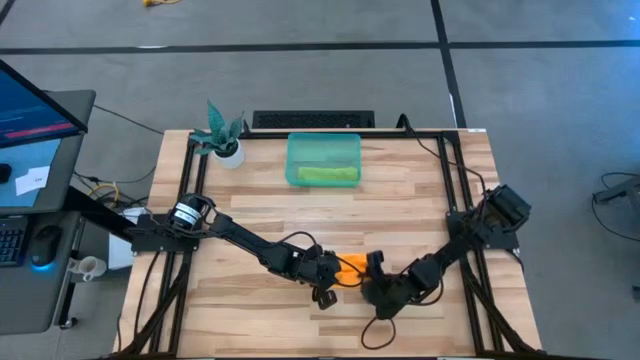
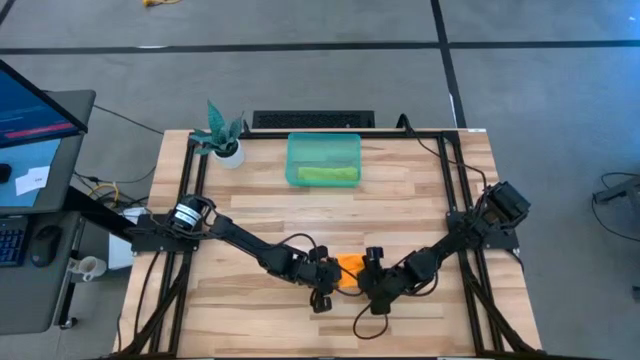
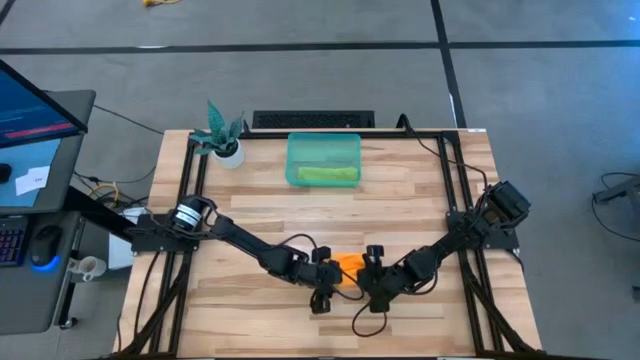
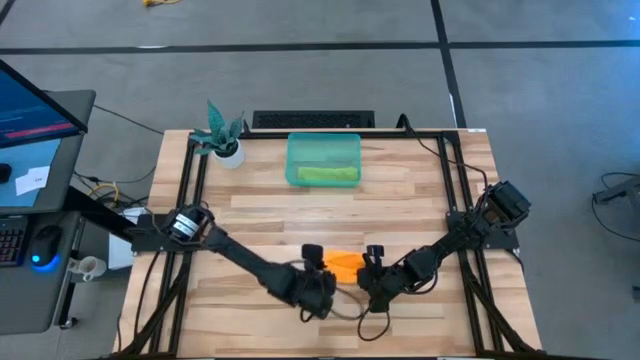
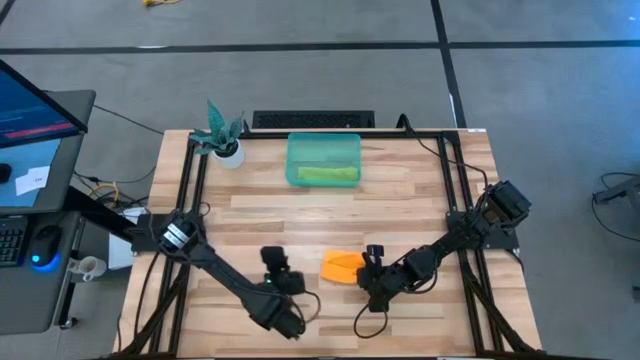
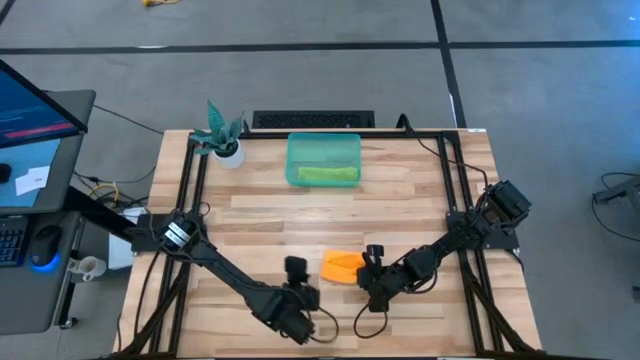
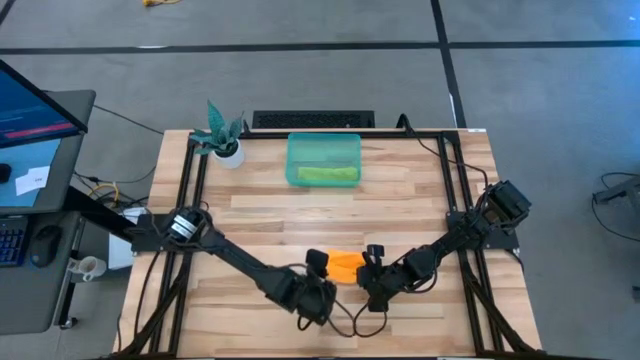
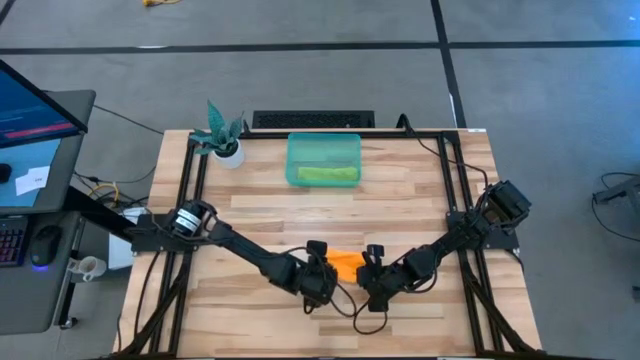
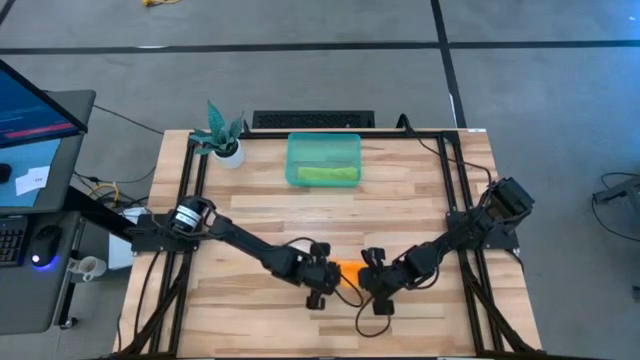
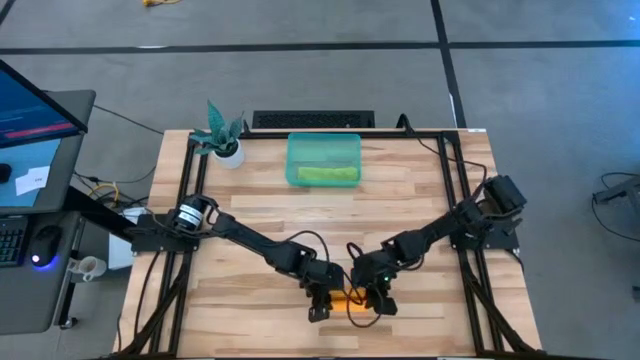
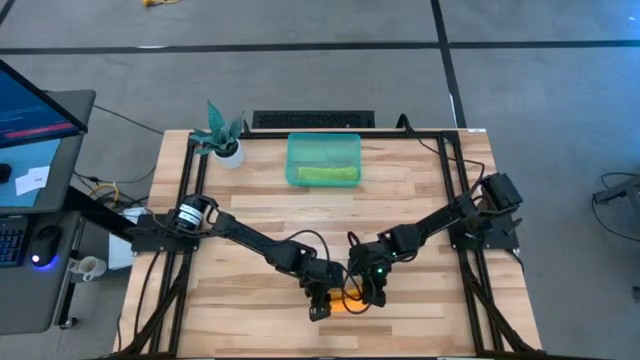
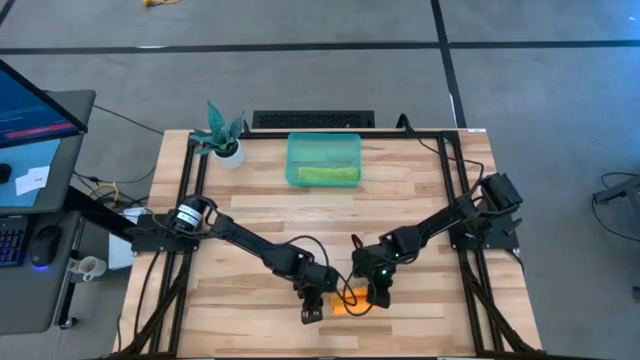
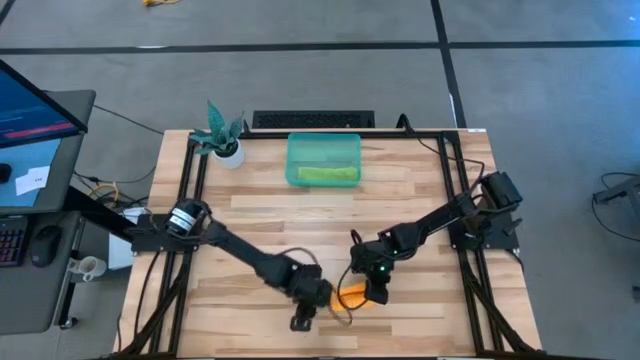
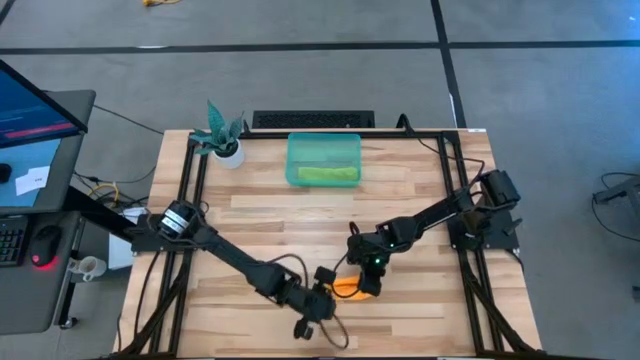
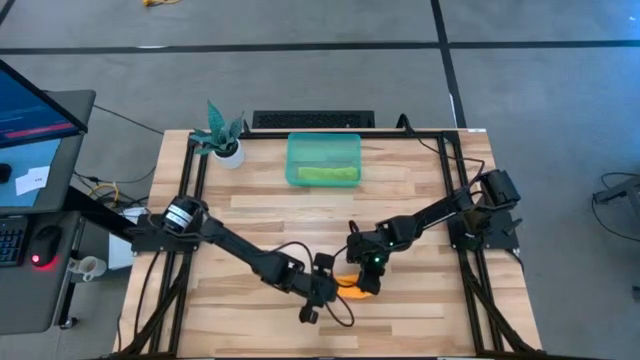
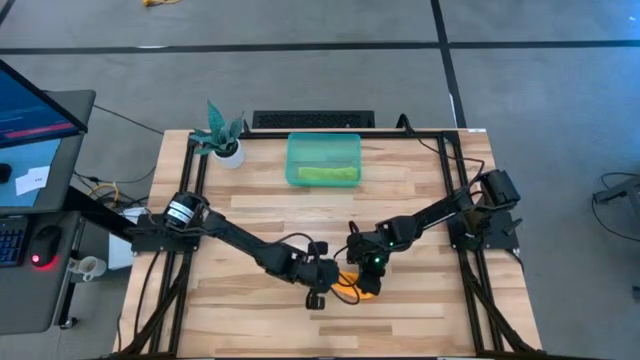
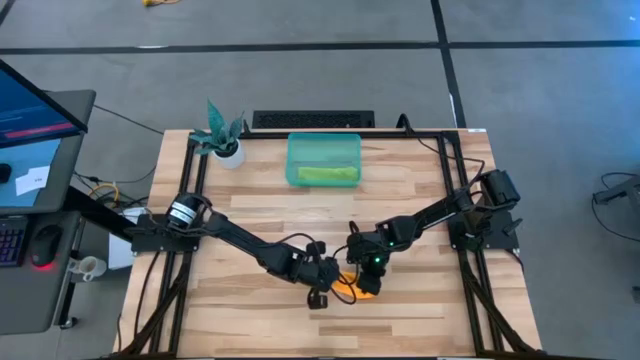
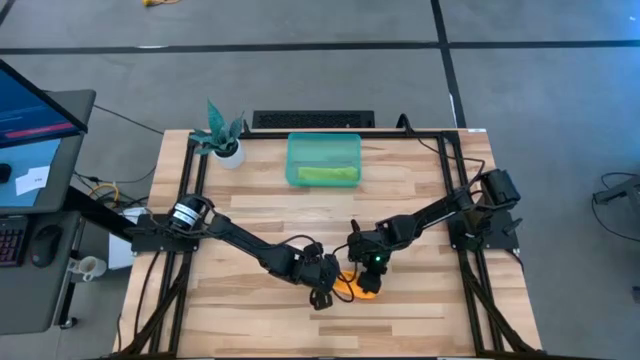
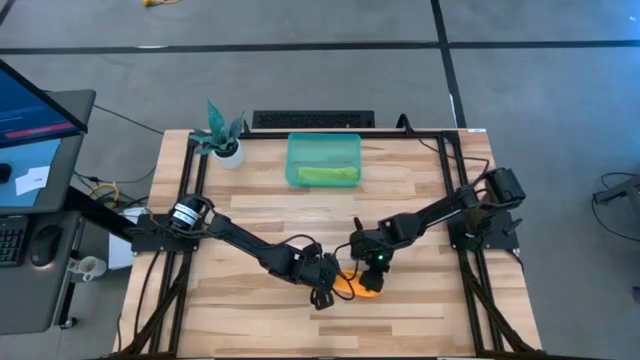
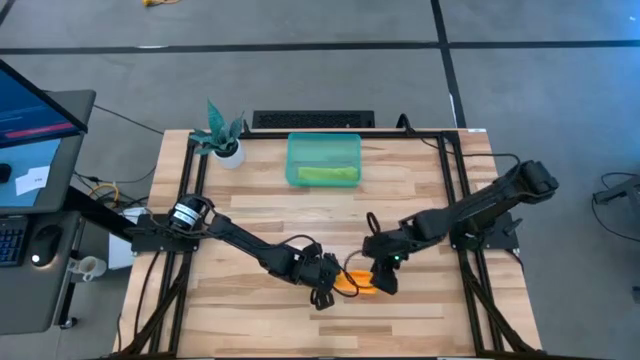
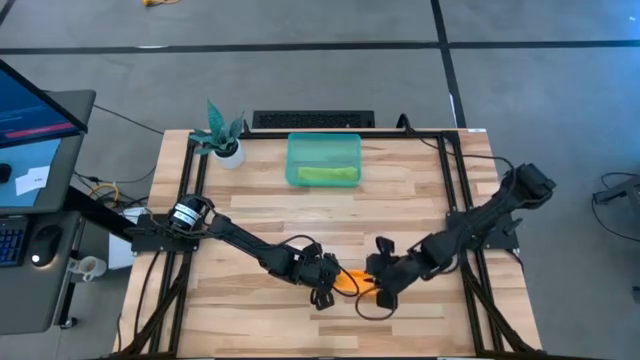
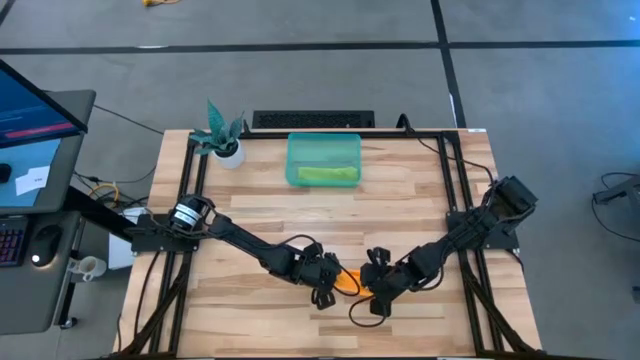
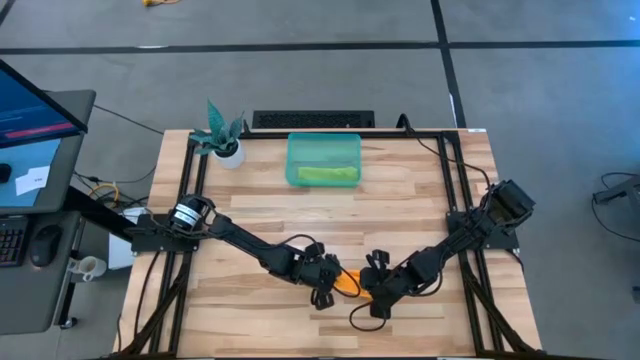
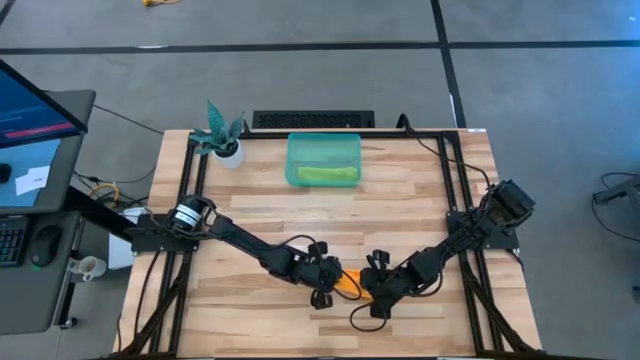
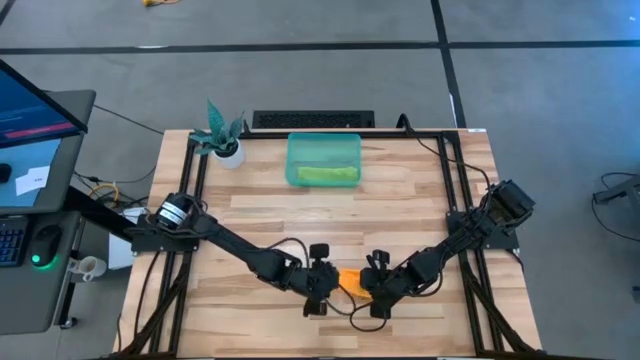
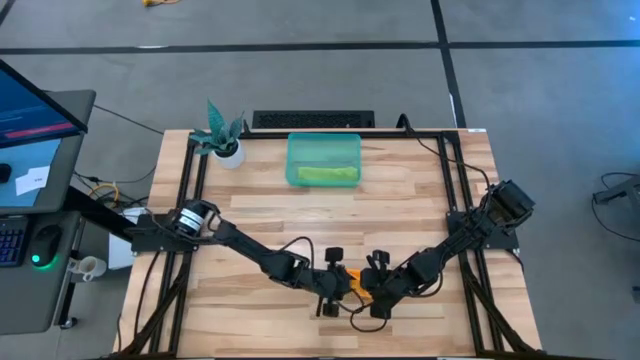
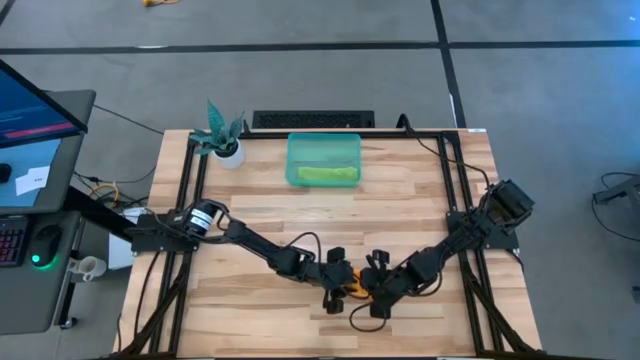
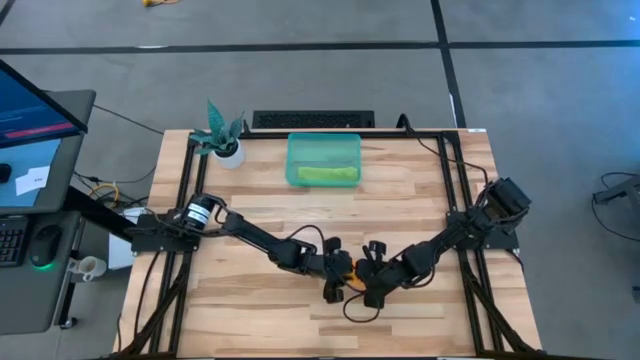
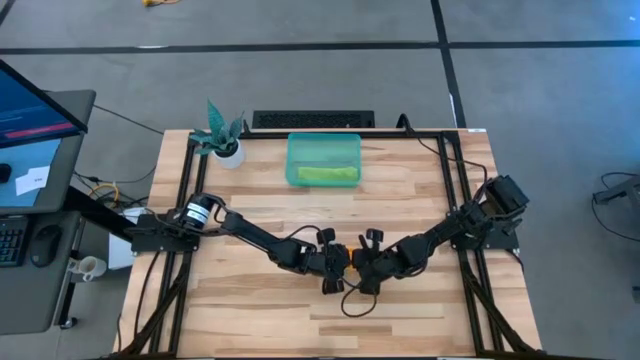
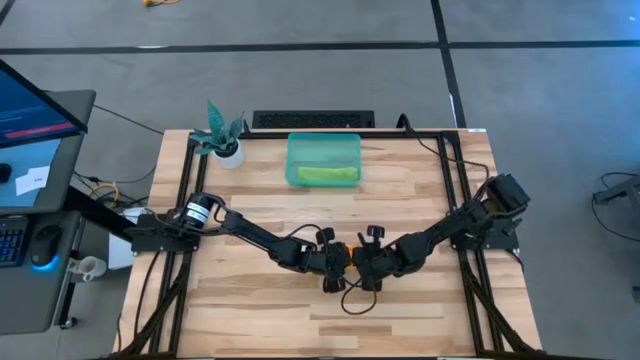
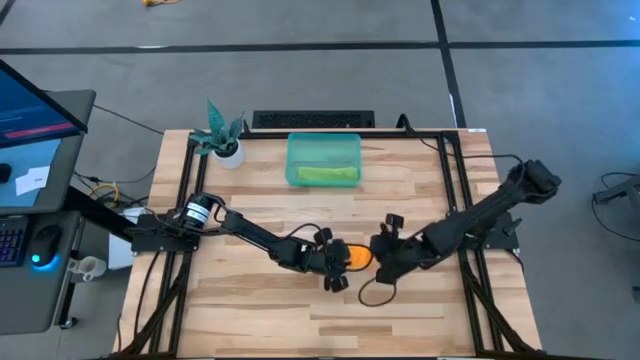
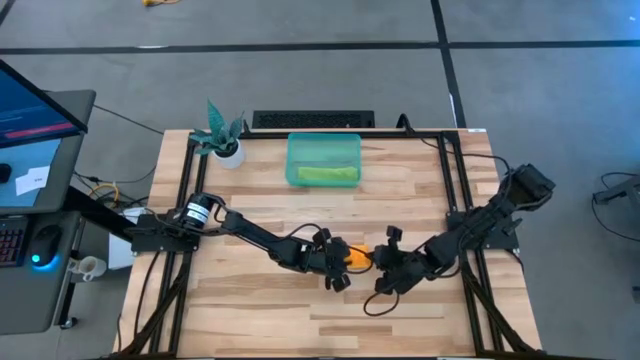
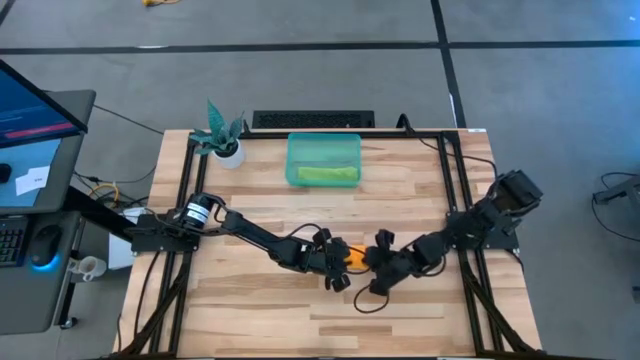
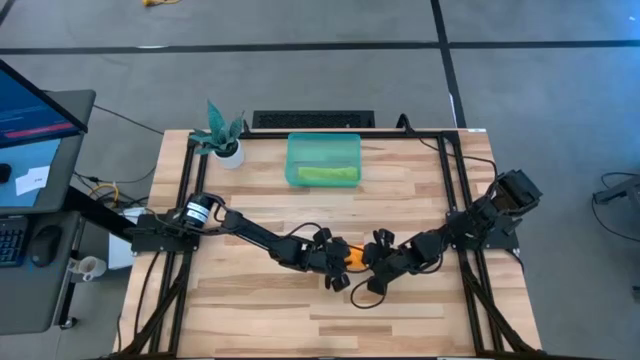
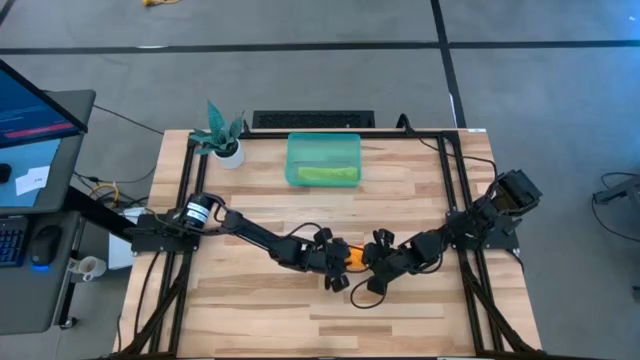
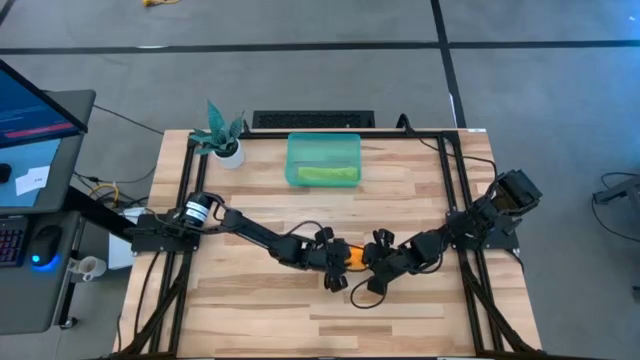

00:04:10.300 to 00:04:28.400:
Task: Roll microfiber towels into tight, uniform cylinder then place into a basket
Roll the orange towel
